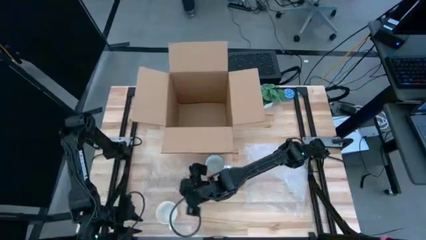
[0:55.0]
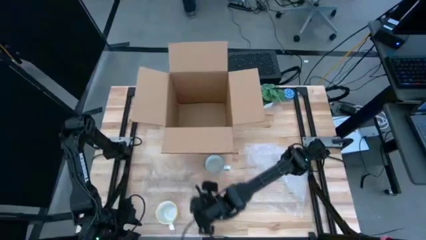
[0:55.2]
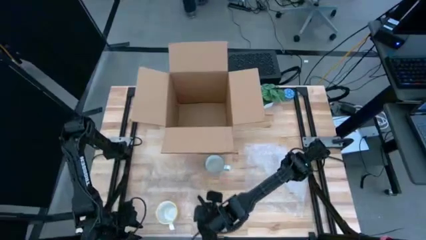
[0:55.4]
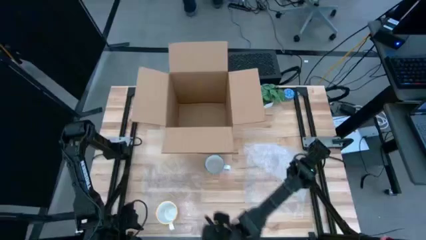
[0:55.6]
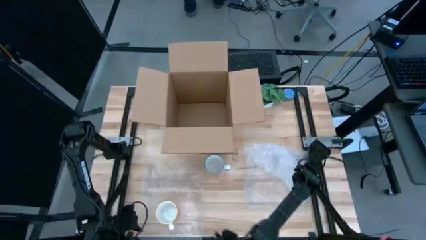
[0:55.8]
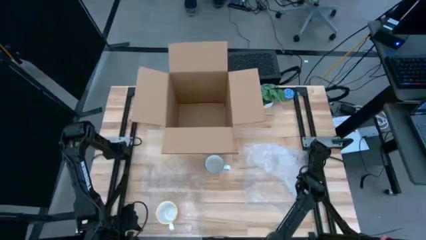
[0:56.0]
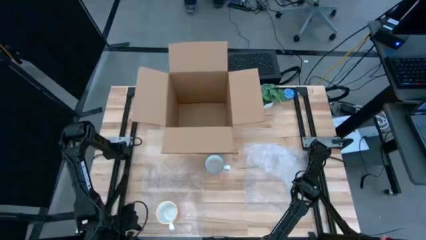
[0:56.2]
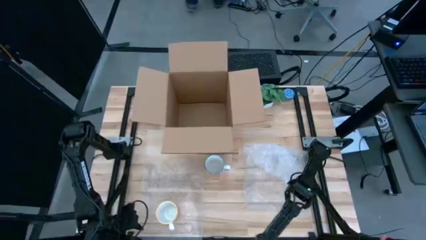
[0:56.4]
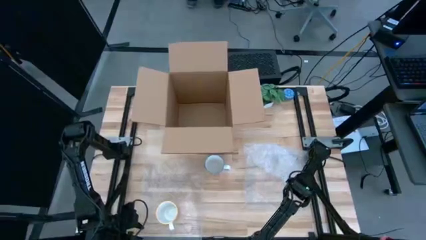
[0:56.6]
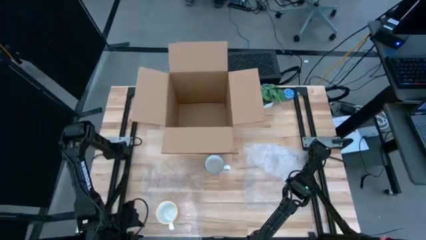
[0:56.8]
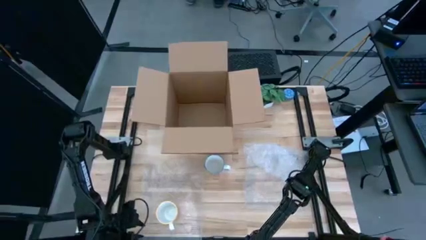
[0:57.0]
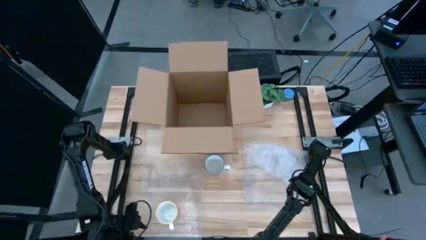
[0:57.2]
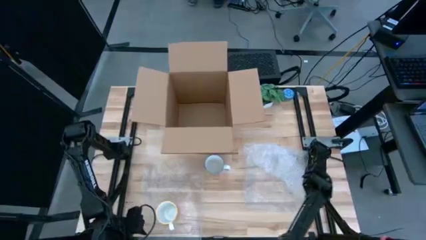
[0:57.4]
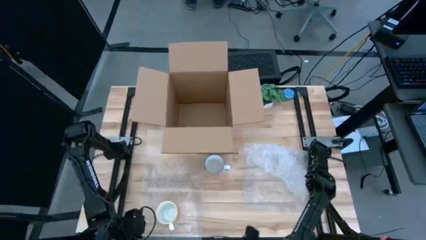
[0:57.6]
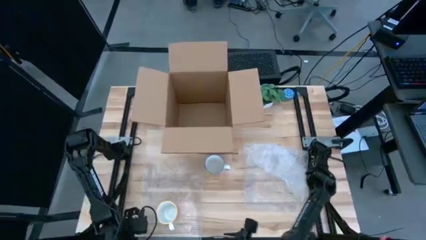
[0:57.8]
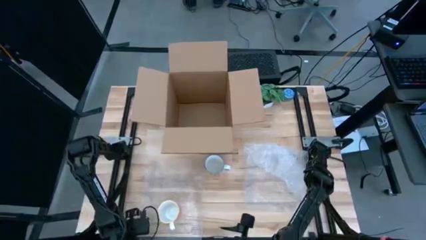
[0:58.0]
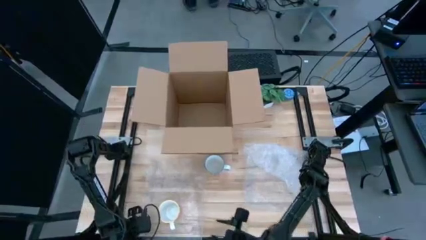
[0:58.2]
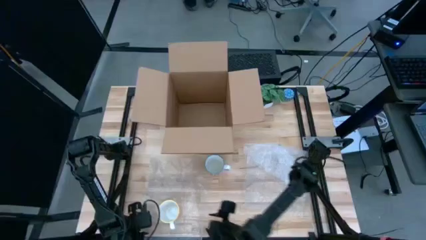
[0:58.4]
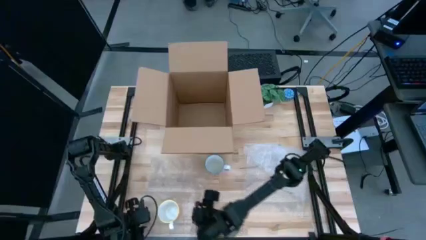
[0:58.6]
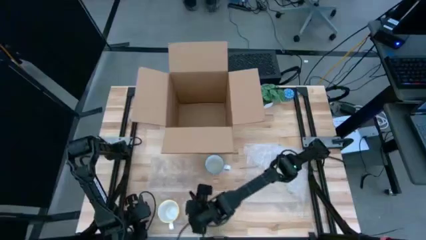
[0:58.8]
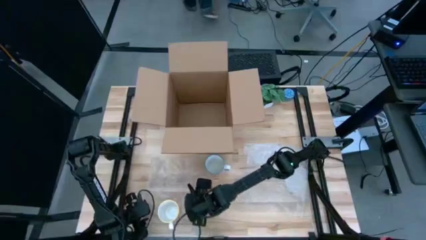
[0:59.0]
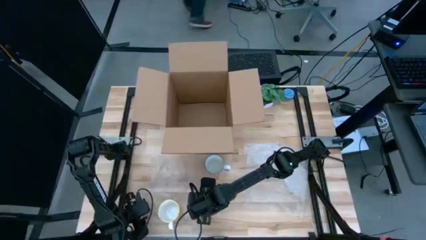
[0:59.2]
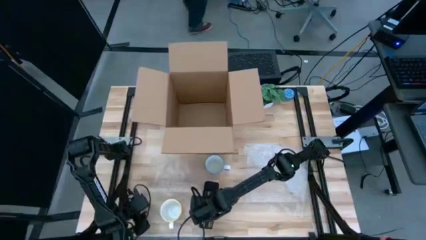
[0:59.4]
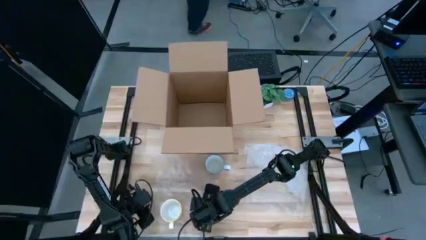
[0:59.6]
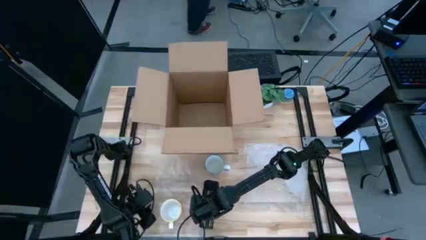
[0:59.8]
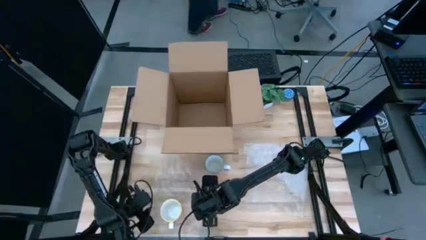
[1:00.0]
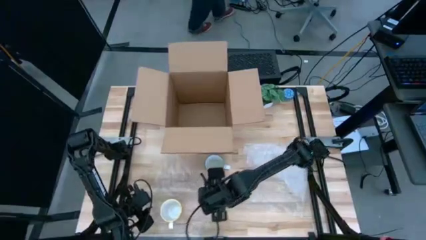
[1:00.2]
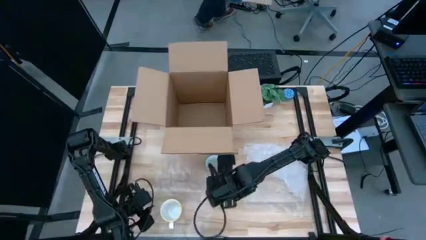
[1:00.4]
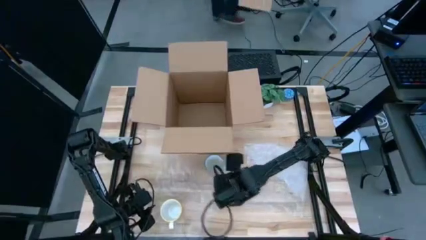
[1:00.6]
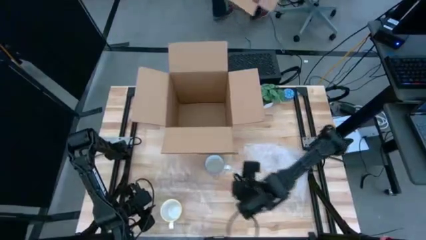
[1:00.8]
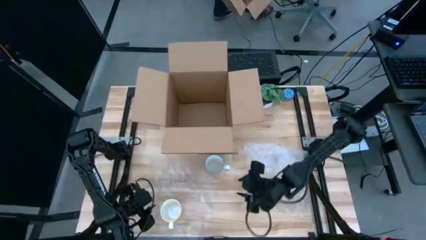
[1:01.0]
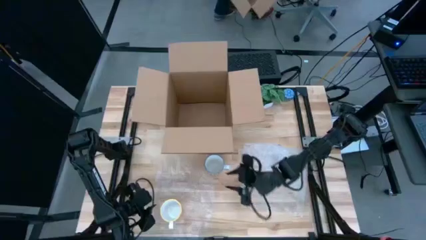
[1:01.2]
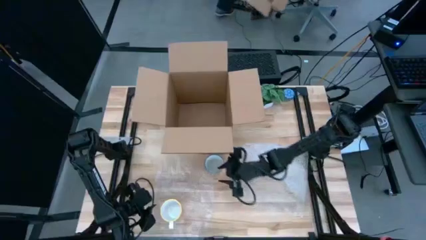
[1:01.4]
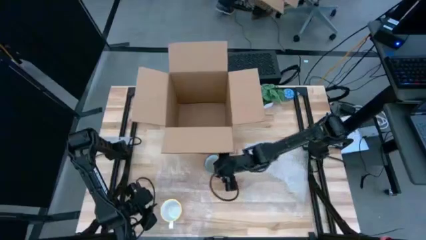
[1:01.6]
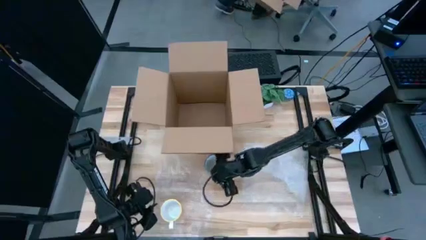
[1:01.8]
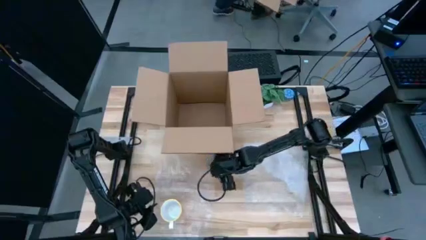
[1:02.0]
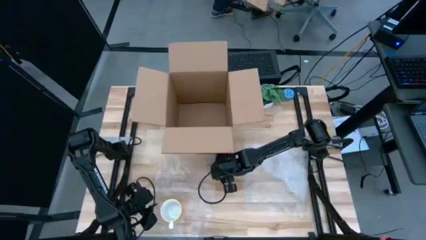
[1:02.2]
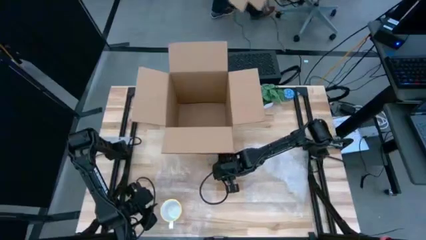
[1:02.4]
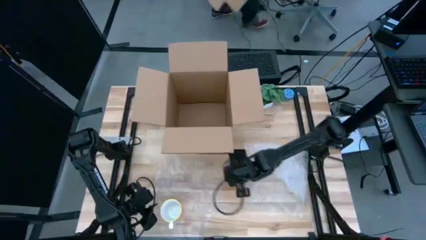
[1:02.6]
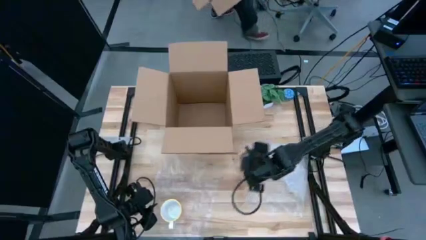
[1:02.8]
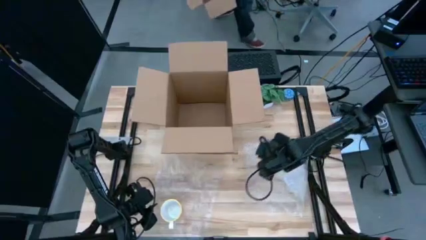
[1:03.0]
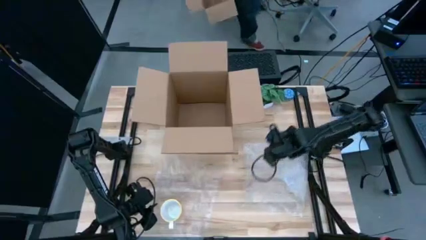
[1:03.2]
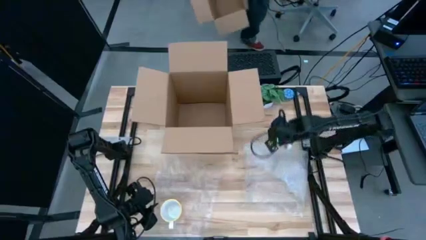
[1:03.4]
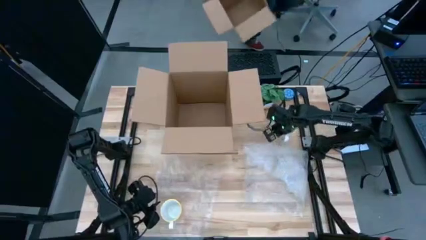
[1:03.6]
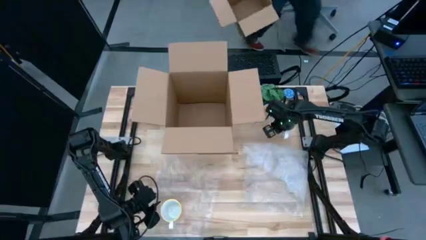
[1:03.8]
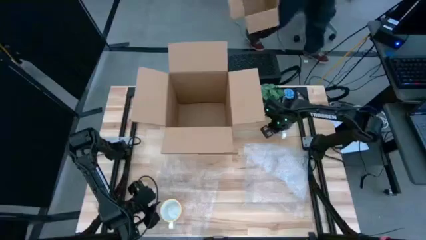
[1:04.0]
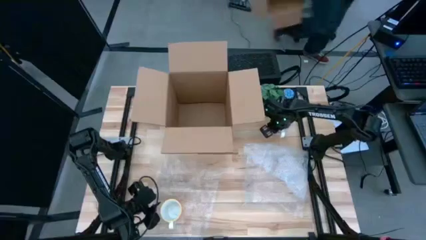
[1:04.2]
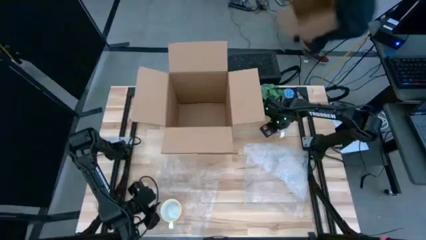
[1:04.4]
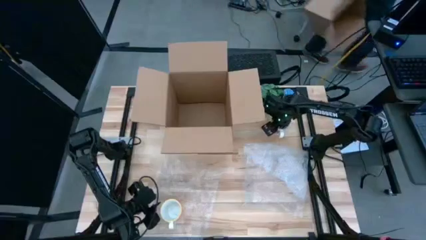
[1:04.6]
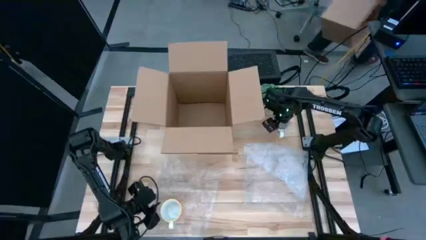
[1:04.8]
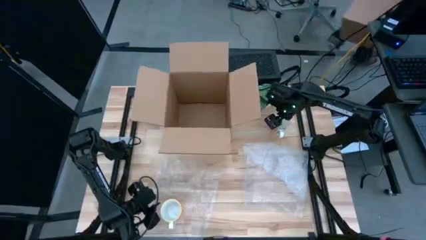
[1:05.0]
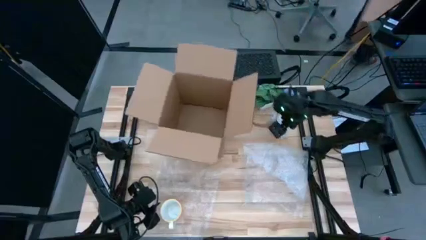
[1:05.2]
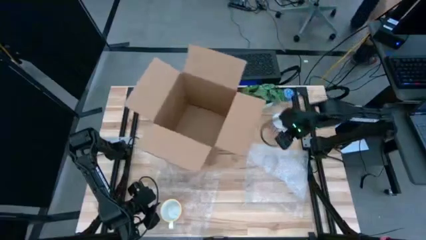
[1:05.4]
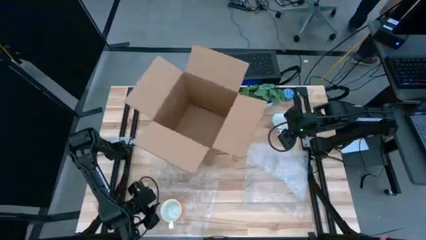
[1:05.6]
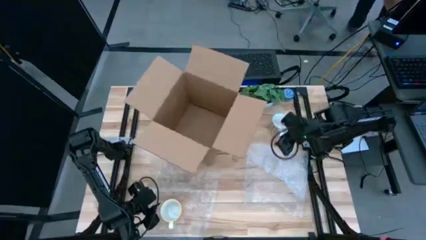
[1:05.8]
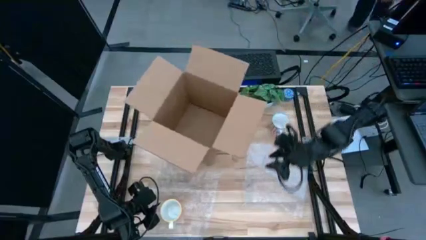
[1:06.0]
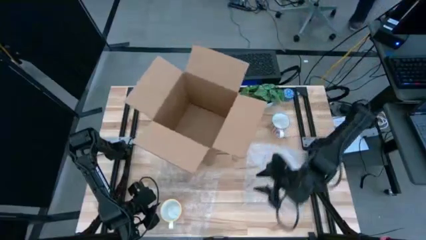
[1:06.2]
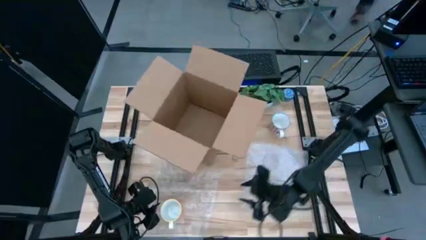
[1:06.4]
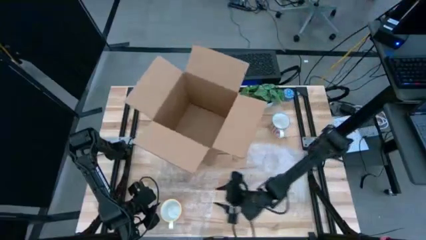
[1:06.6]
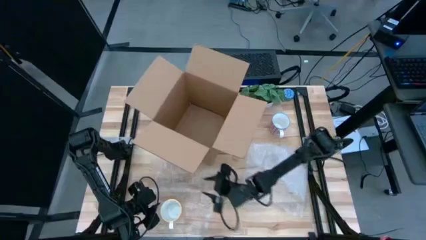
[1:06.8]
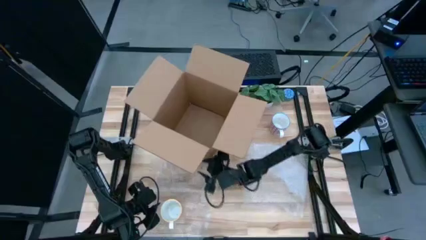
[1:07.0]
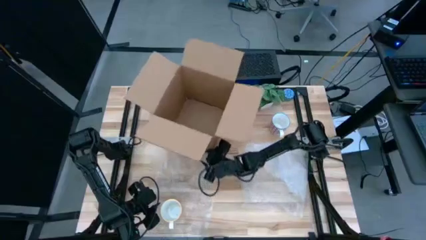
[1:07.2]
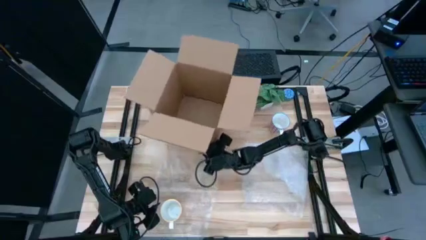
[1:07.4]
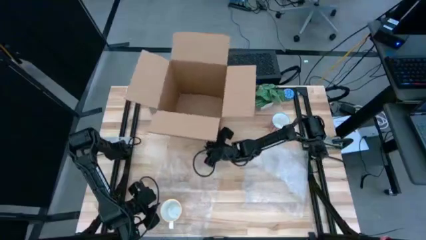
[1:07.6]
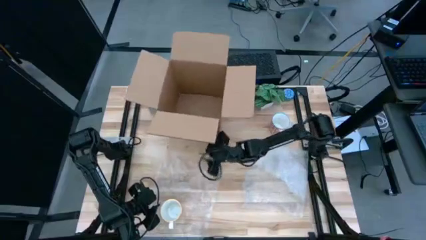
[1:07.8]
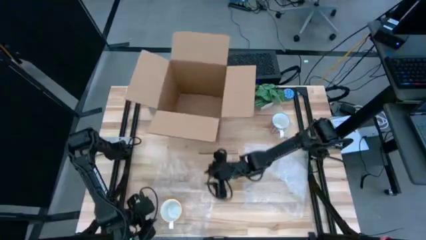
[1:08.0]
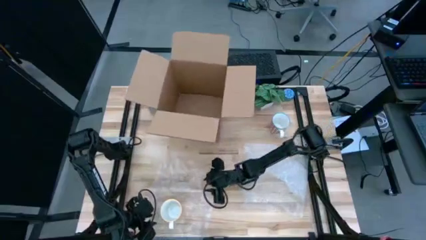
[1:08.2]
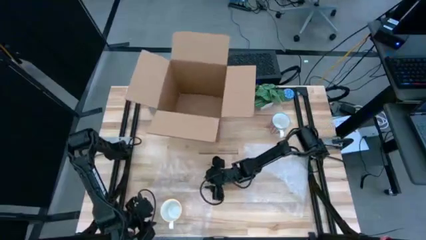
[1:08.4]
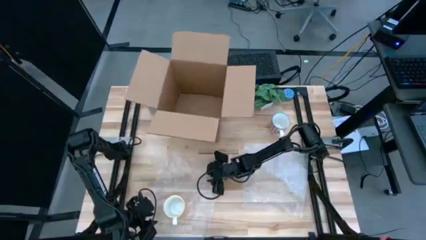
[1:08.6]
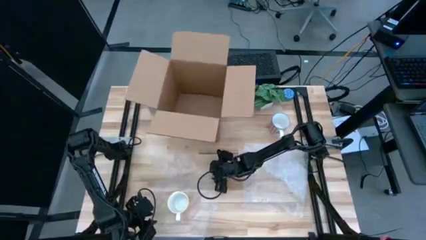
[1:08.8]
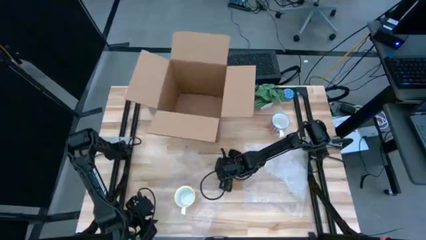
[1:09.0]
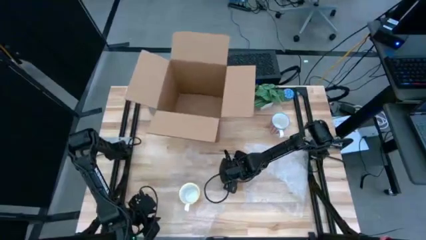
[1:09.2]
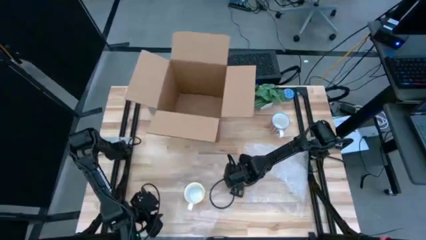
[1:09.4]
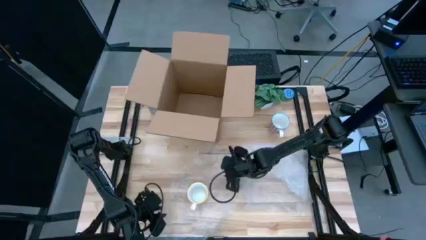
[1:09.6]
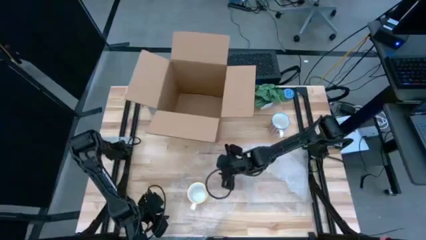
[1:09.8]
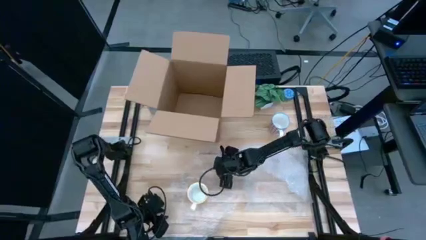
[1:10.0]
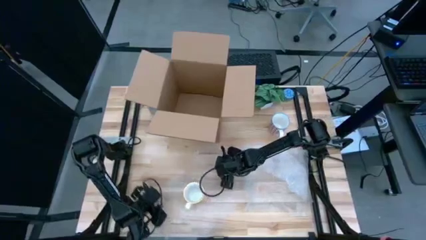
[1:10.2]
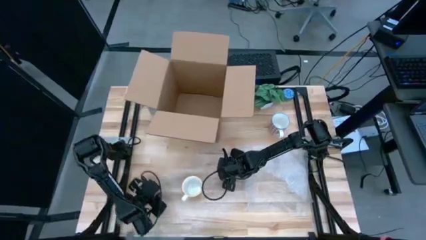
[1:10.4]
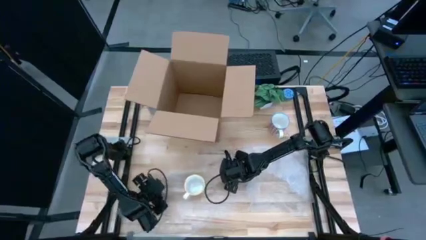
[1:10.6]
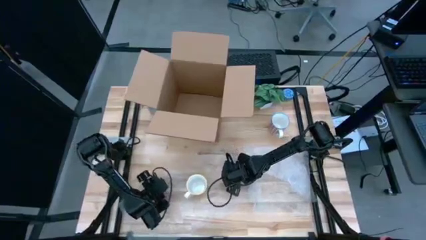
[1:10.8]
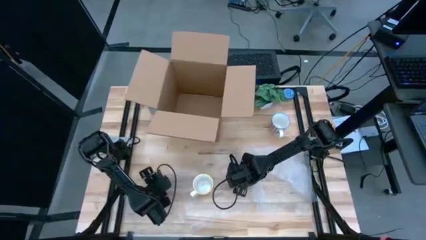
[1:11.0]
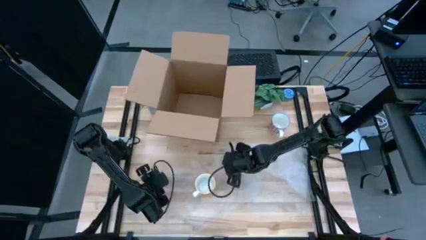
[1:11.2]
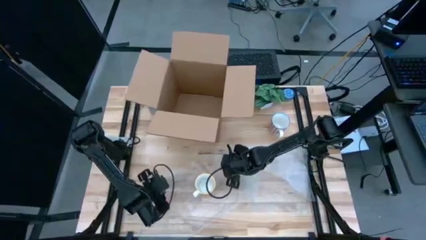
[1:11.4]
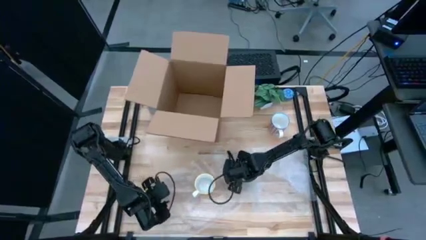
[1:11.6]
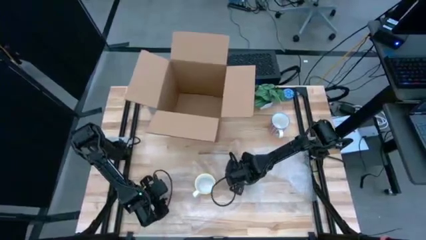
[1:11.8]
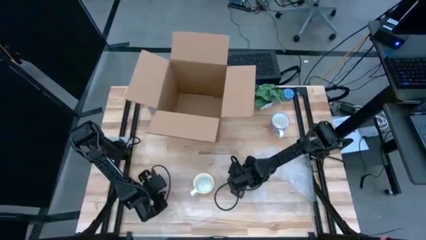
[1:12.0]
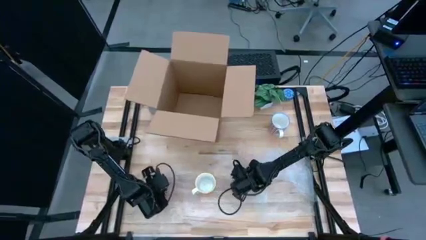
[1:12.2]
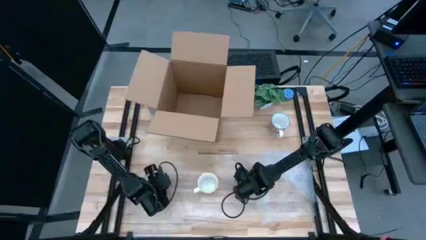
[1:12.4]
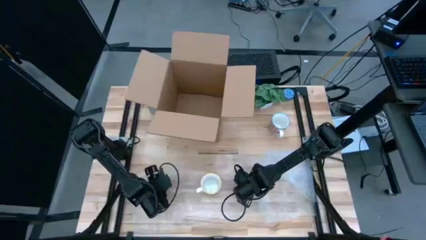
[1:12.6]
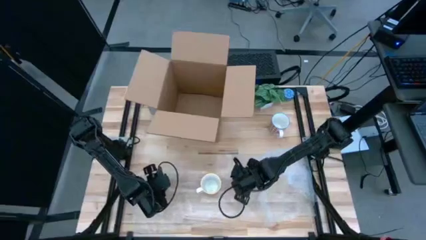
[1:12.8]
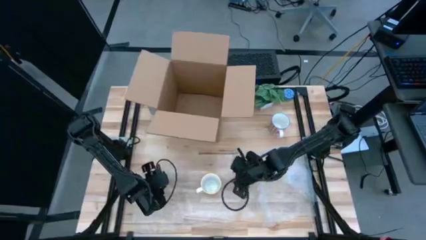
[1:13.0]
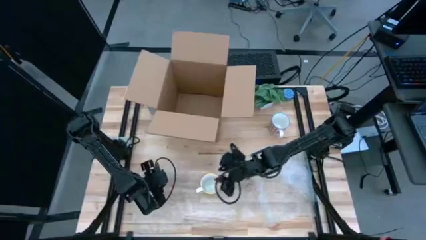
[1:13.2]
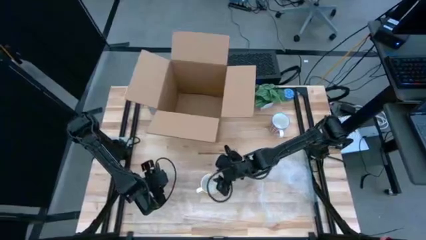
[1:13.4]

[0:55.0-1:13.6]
Task: wrap mug
Wrap the yellow mug with bubble wrap
